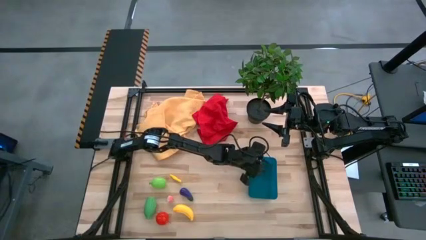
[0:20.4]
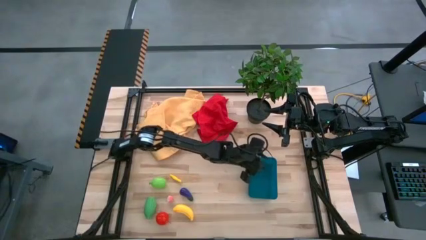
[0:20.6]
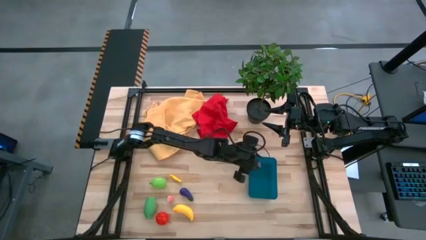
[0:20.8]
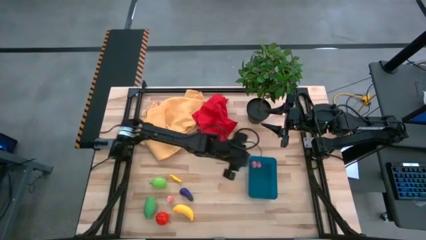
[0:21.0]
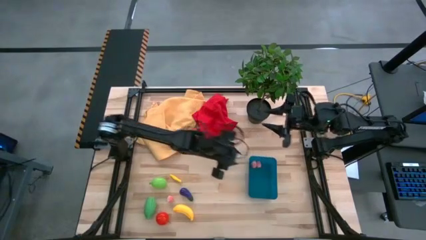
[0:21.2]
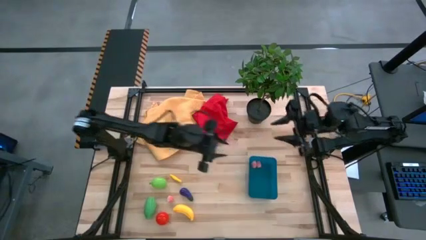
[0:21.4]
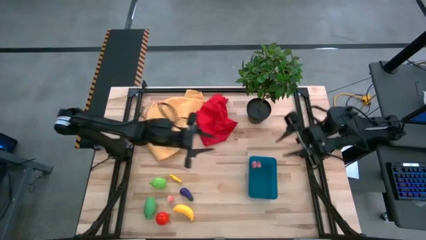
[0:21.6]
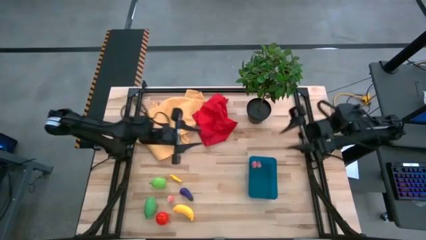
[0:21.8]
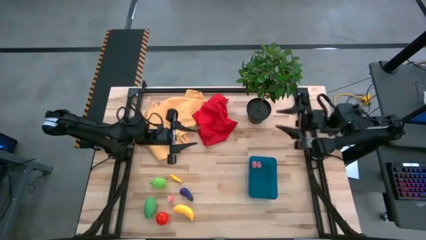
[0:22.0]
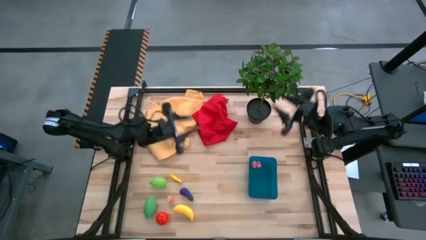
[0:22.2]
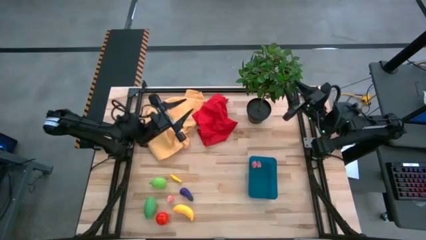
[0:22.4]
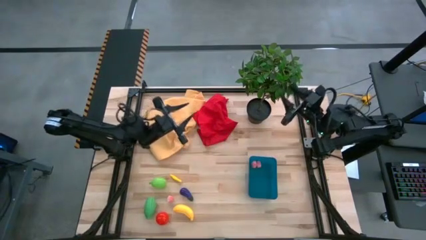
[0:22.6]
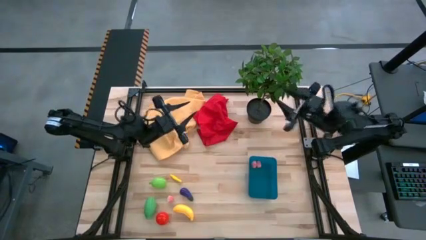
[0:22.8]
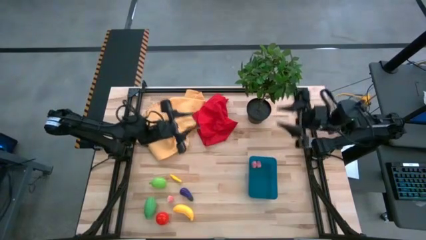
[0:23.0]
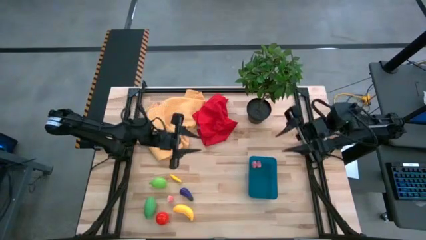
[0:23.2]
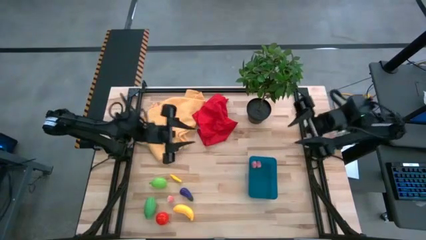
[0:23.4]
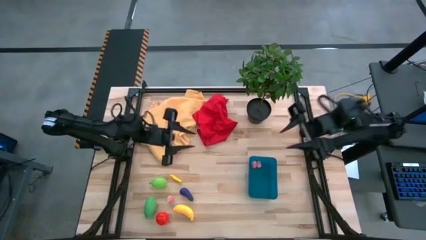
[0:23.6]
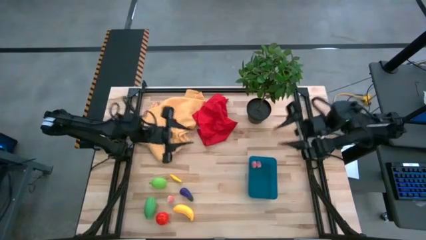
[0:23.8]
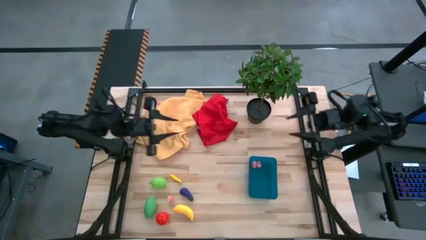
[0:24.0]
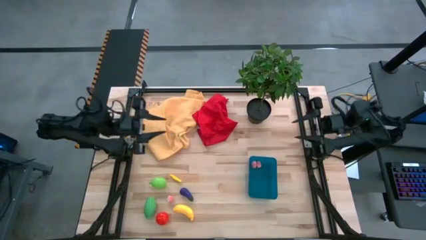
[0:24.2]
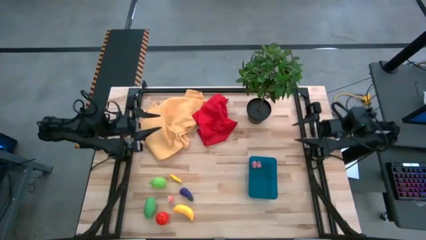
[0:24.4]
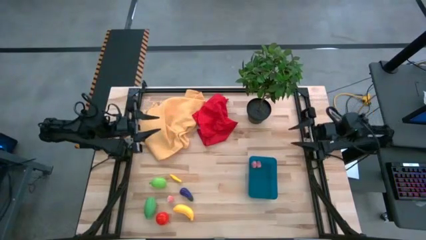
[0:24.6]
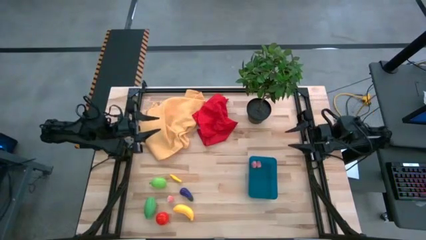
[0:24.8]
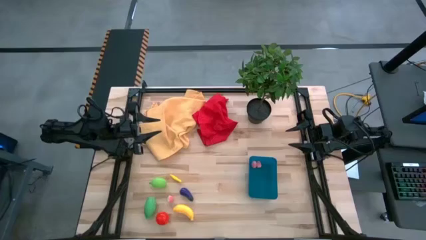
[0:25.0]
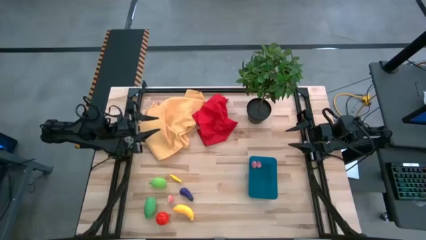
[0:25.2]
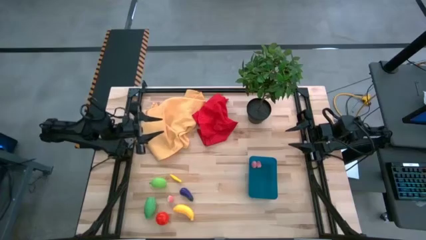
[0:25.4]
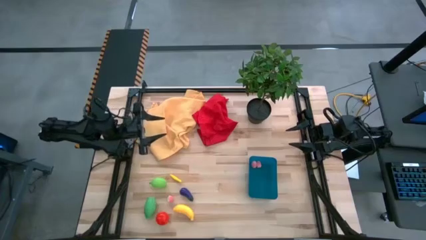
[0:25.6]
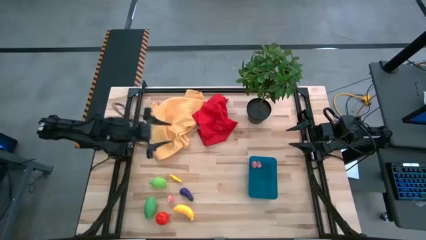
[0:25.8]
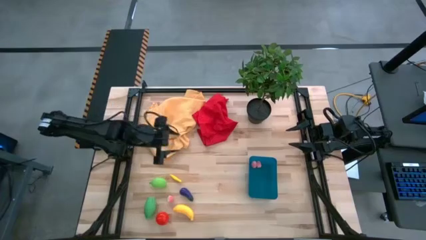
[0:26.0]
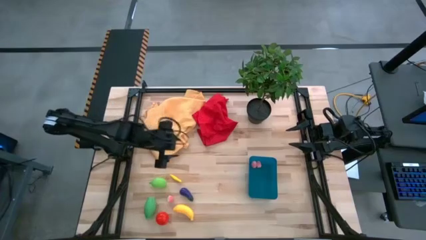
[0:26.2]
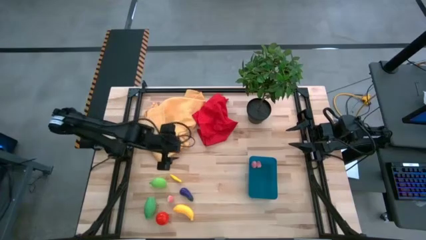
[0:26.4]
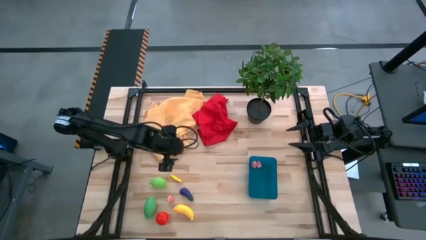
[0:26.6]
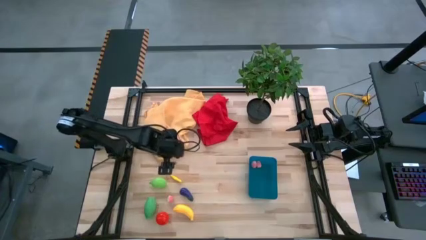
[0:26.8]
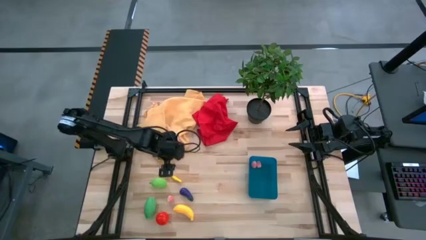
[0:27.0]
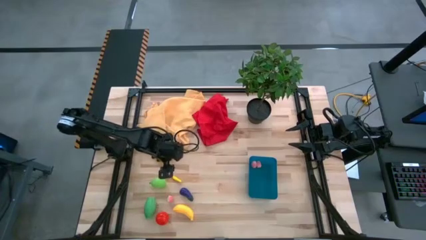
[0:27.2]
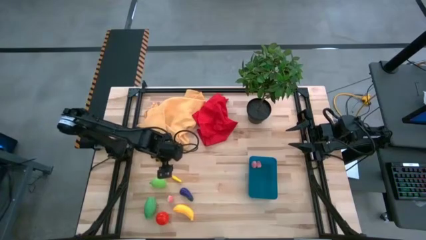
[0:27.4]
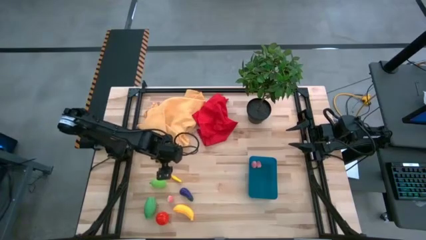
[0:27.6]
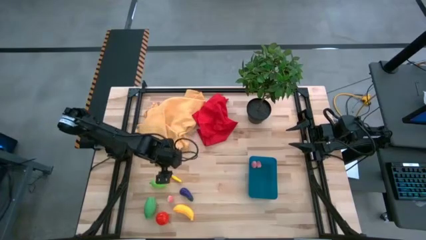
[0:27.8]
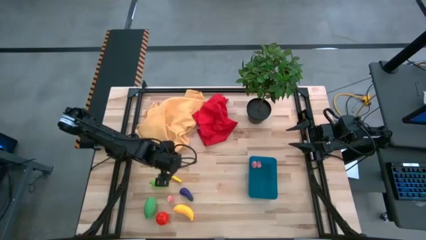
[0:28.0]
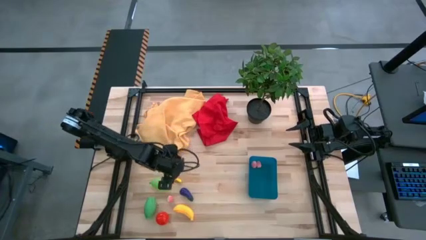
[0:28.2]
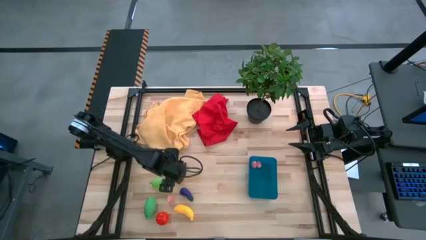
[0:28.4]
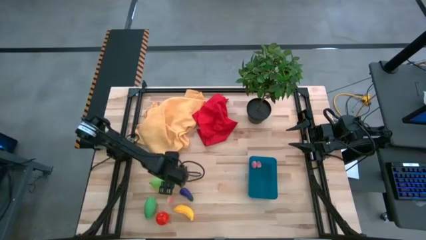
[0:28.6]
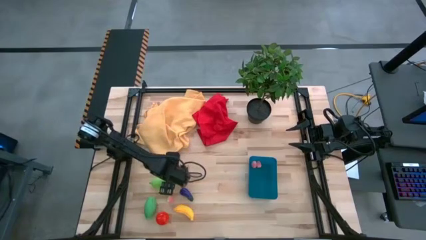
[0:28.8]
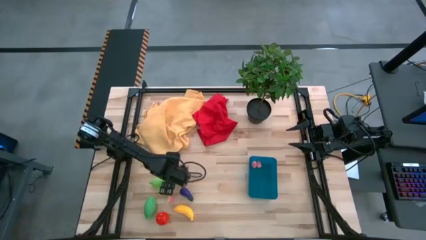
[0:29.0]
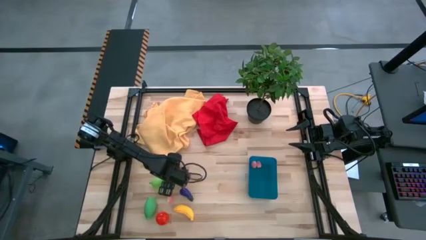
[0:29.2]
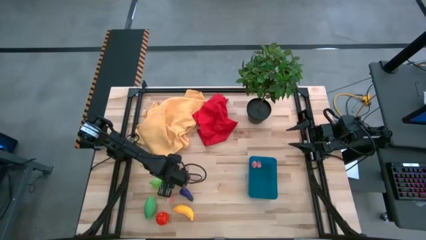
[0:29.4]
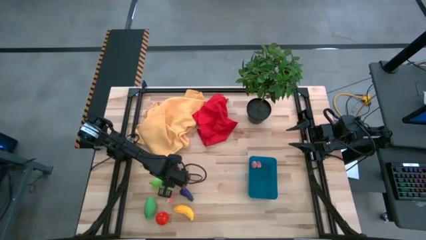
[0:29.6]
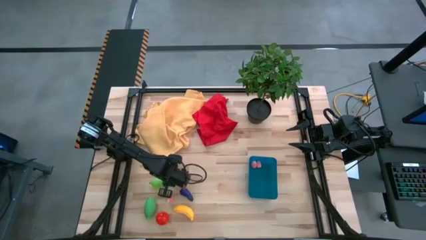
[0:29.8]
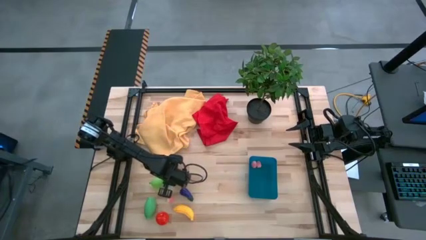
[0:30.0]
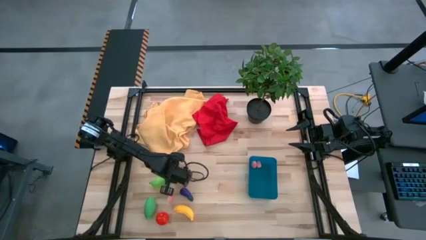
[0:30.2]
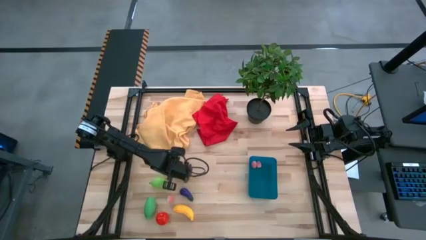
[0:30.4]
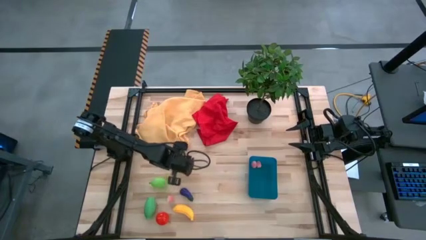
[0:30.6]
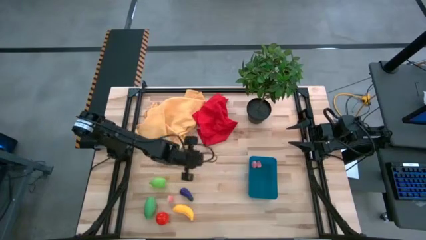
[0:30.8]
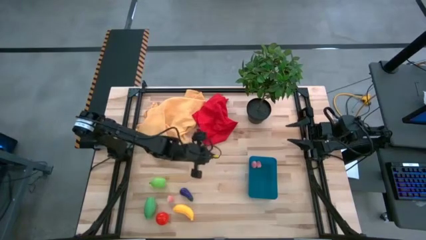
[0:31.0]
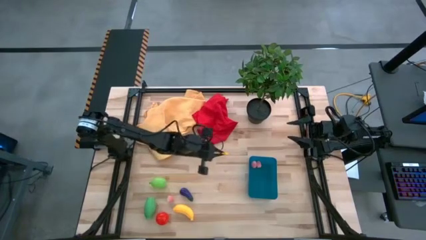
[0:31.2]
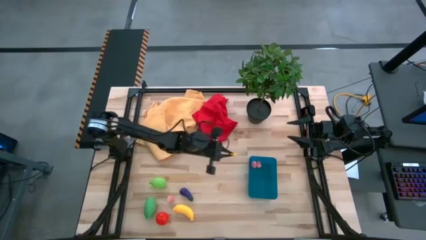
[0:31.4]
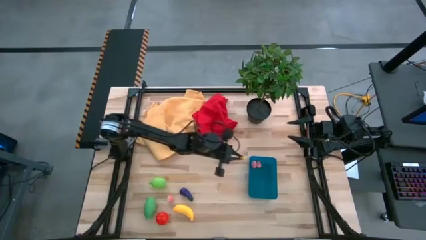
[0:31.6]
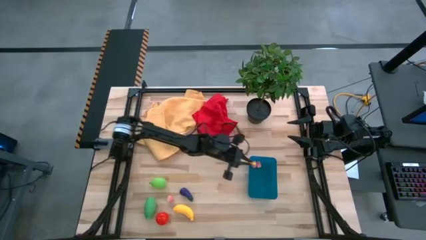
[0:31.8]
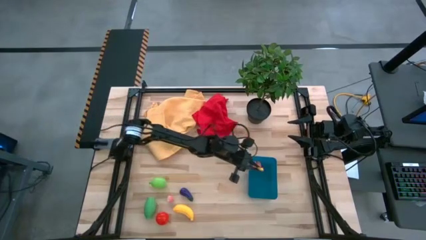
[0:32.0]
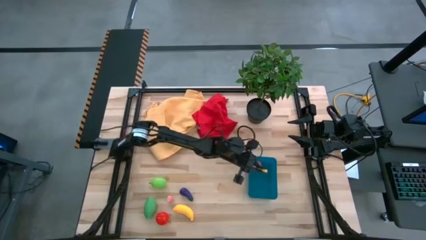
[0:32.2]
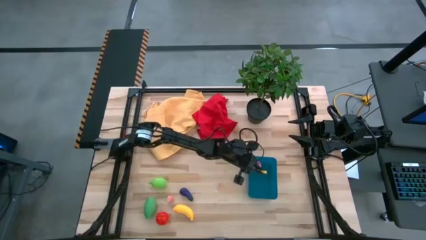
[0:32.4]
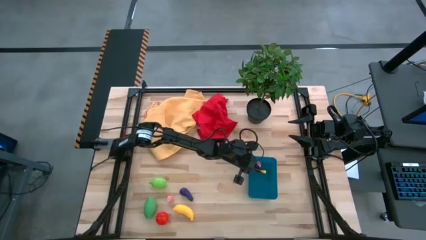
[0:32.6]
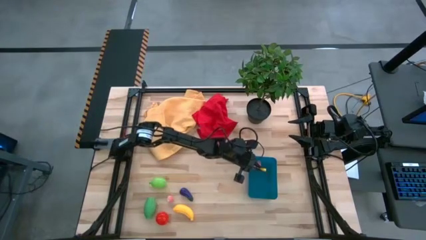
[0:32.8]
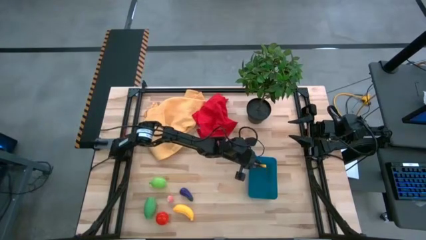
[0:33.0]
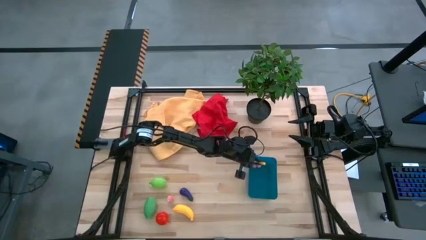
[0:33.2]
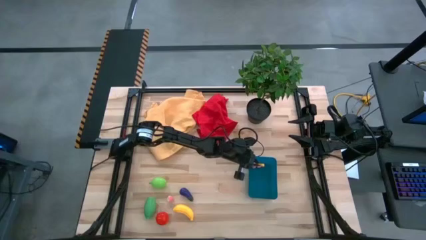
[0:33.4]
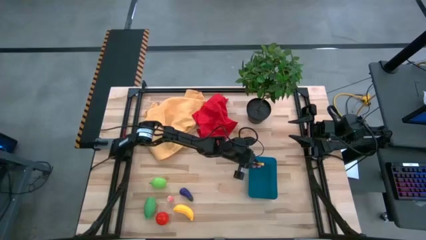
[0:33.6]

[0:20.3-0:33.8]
Task: Pick and placing Produce into tupperware
Put the top corn into blue bin
